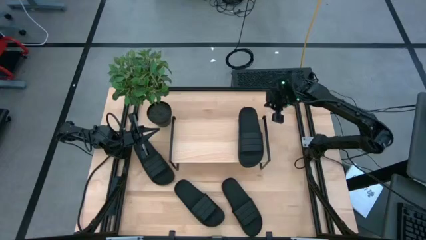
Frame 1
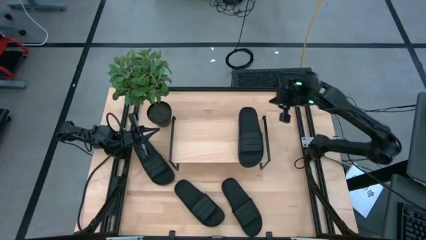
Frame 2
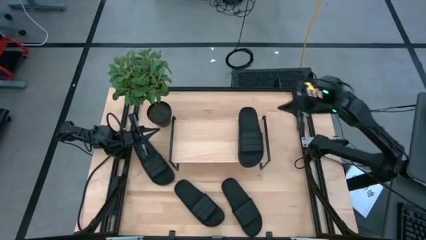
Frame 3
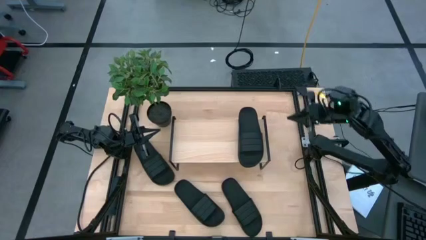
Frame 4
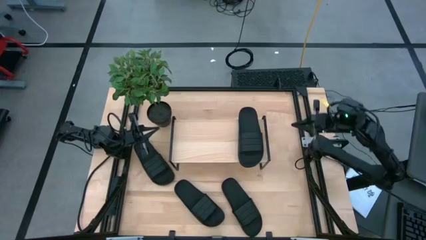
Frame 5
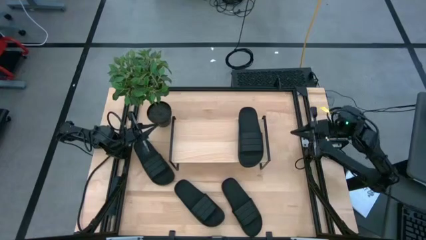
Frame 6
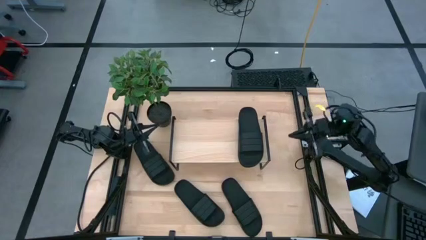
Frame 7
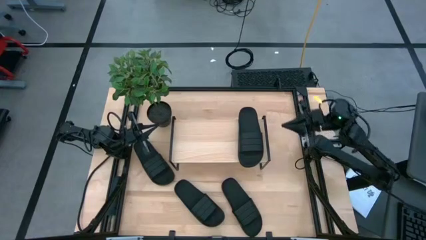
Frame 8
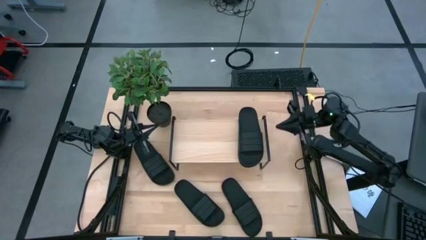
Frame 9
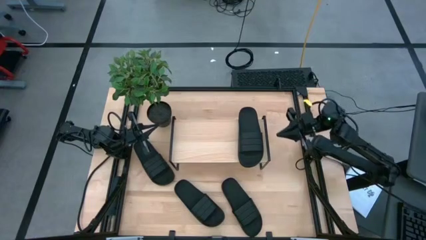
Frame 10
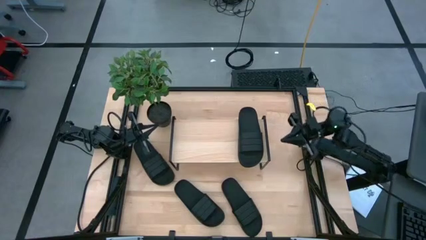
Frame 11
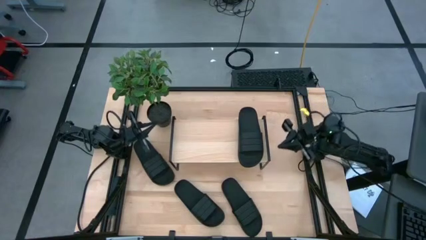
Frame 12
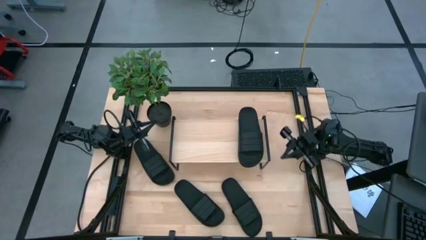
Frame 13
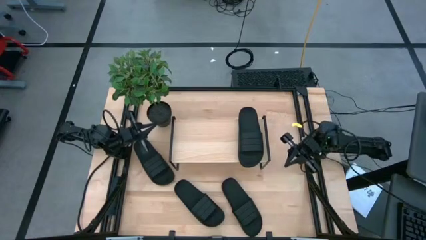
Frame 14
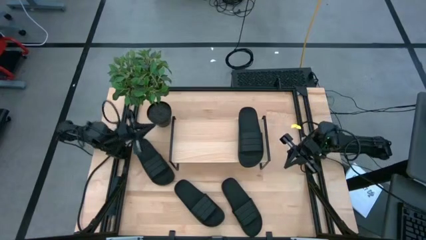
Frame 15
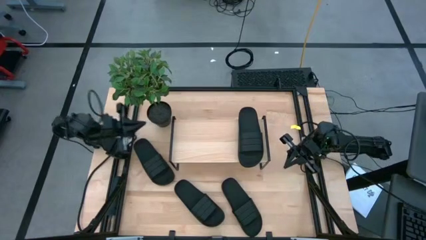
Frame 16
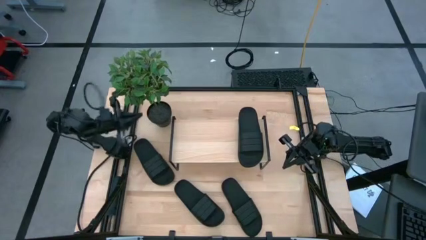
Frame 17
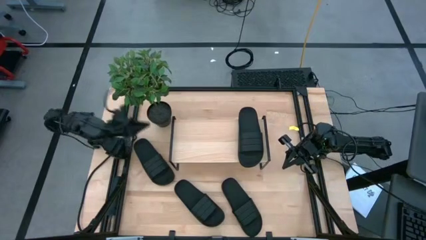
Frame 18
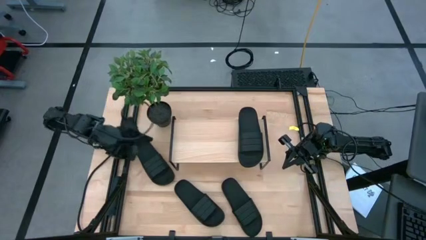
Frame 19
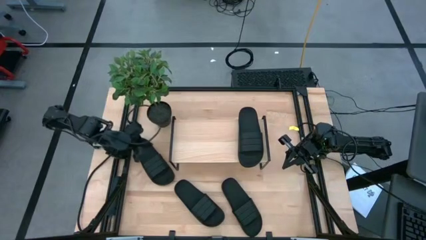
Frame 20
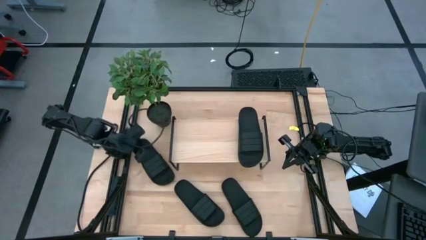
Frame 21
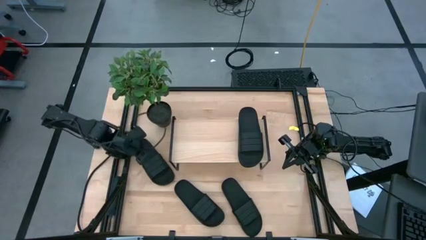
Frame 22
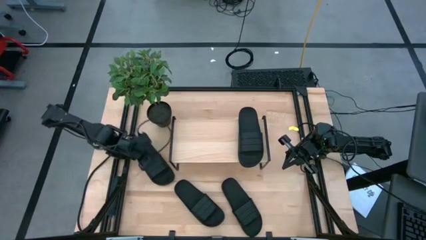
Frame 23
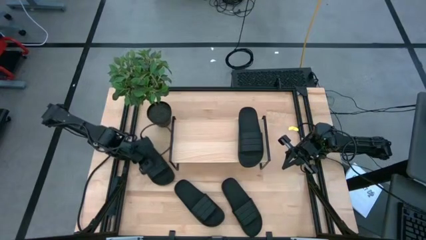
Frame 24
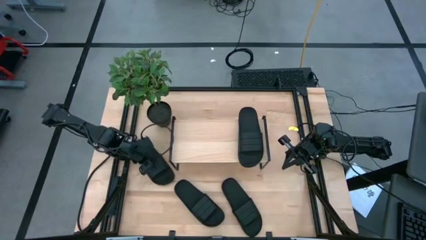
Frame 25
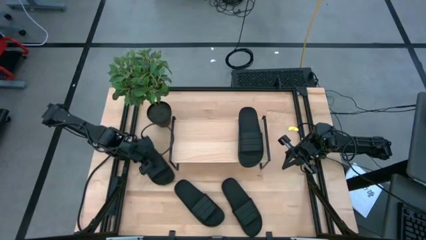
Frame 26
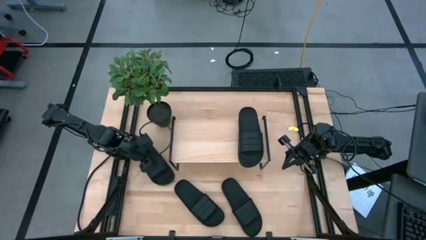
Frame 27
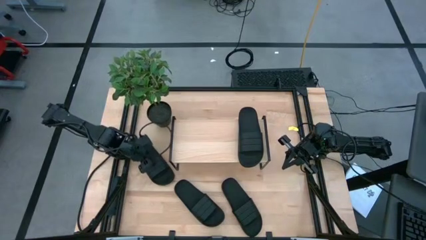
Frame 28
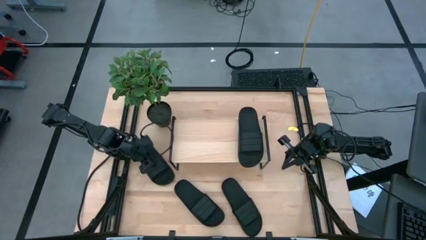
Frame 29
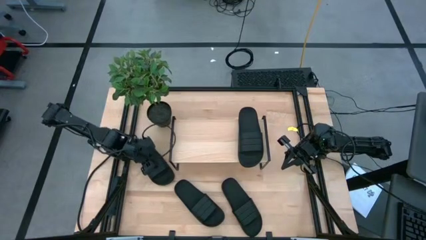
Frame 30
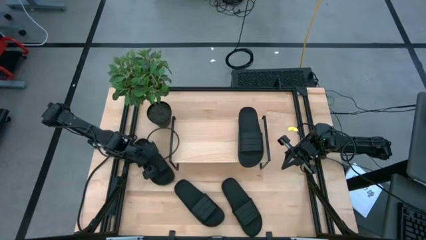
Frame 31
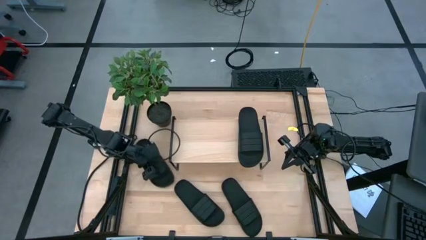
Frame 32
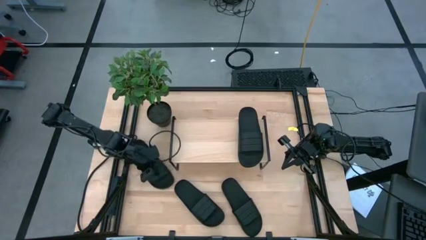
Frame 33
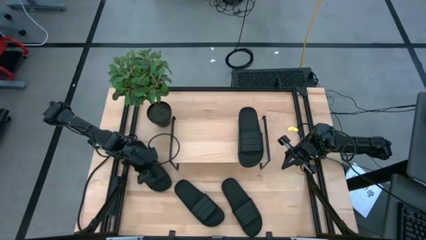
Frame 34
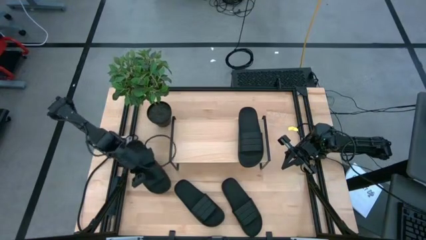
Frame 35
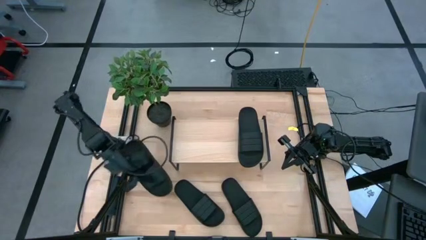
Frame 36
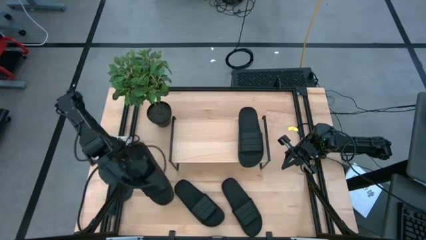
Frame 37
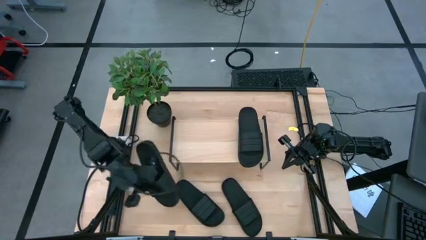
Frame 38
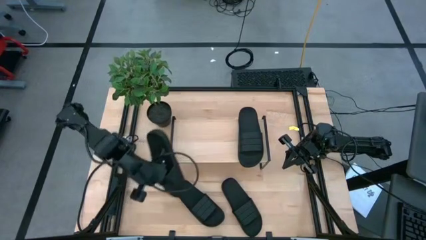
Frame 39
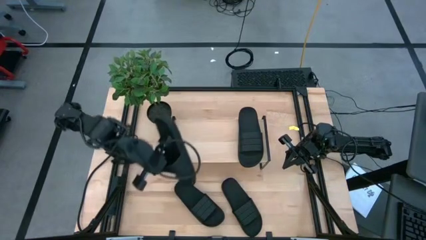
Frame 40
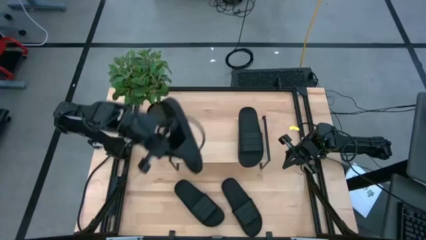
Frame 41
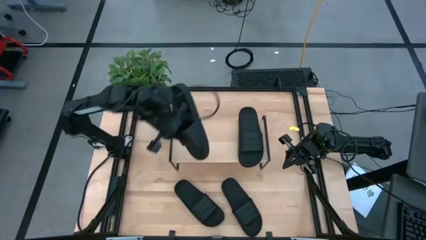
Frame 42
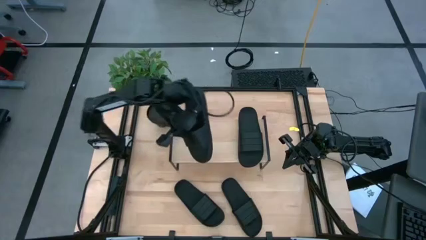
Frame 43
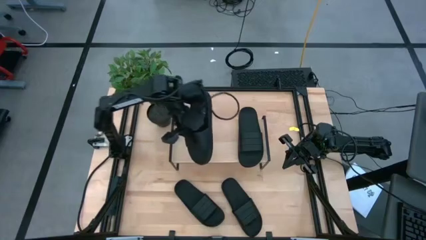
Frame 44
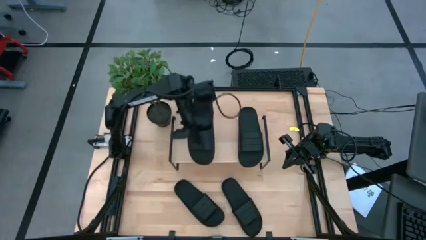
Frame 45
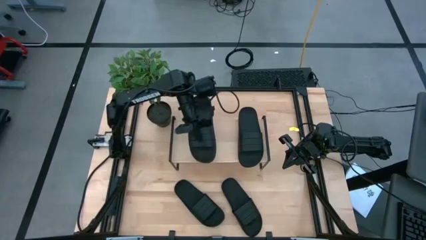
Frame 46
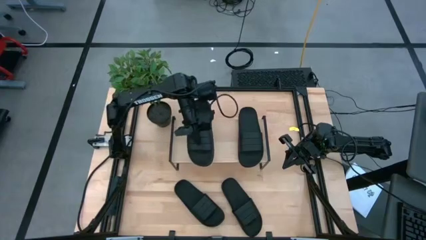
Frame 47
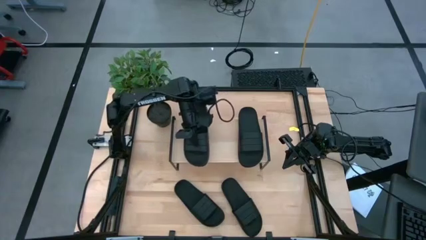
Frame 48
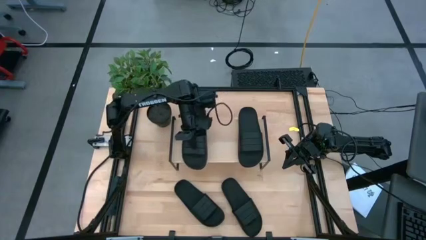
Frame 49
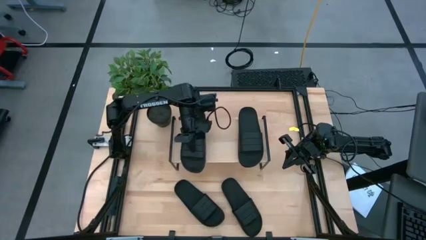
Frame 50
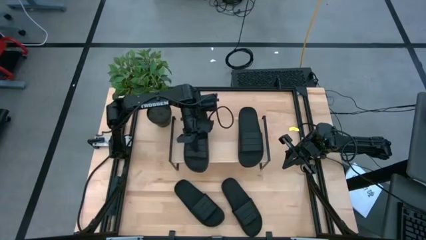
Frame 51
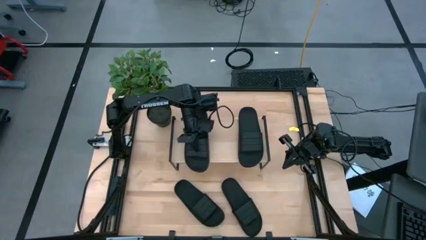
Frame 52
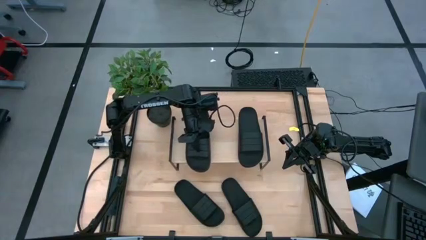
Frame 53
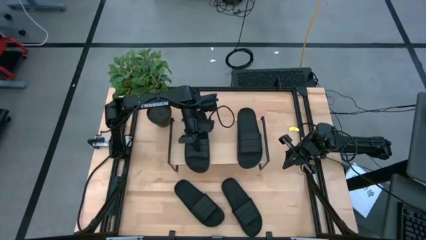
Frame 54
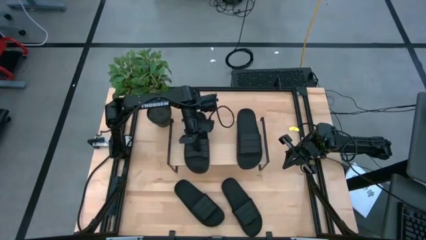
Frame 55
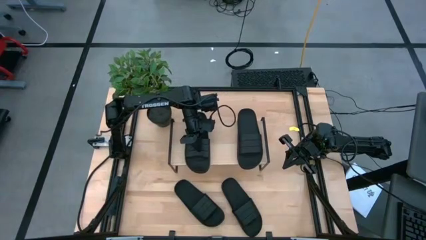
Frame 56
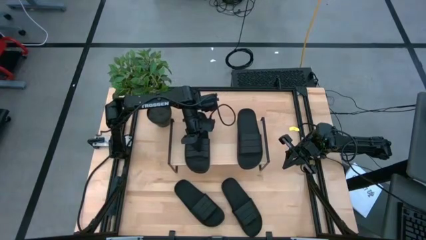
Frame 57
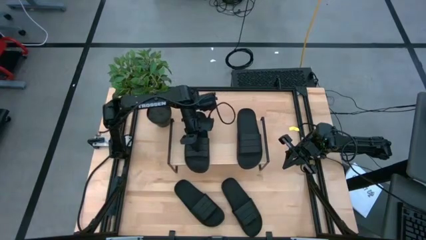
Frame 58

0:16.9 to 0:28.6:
Task: Pick and place slides into the shelf
Put the black slipper on the shelf

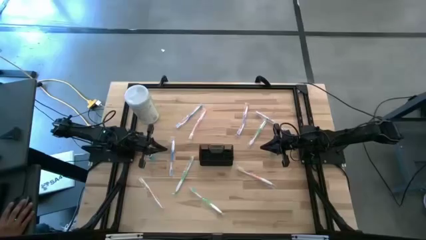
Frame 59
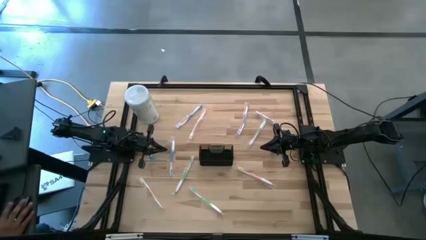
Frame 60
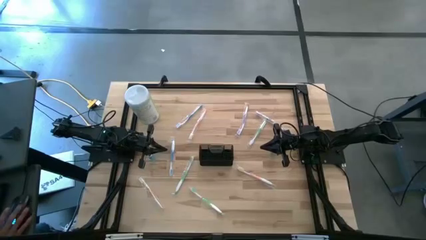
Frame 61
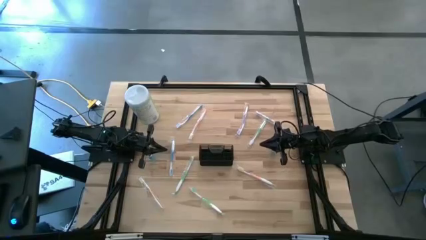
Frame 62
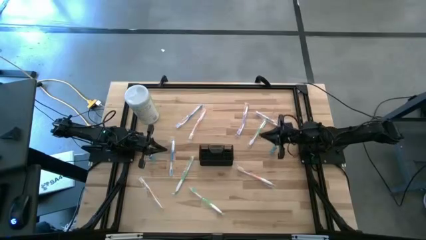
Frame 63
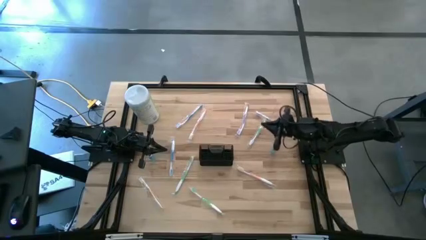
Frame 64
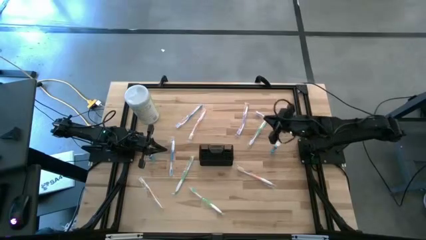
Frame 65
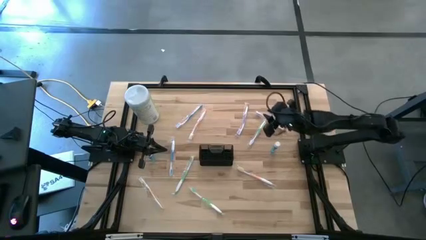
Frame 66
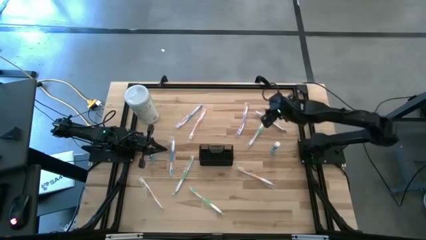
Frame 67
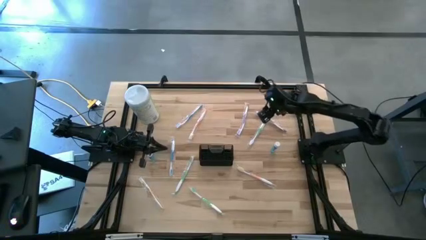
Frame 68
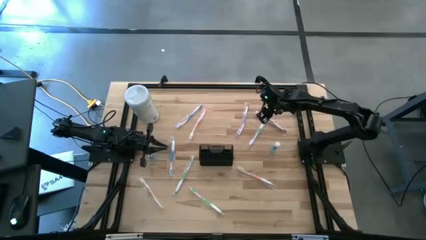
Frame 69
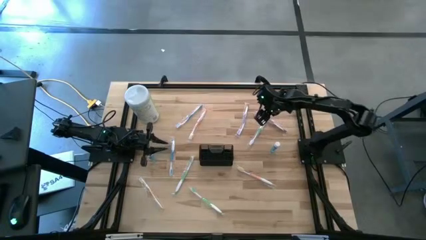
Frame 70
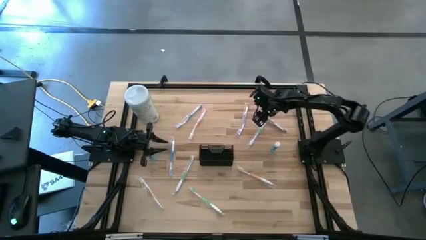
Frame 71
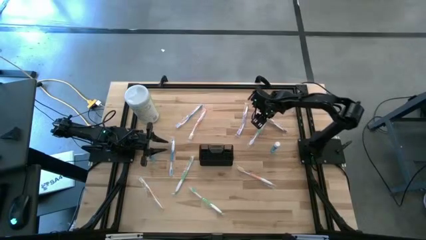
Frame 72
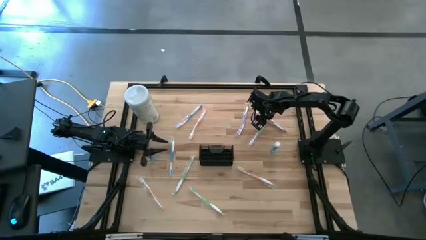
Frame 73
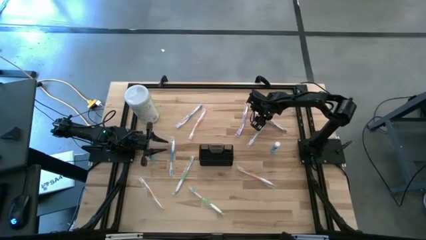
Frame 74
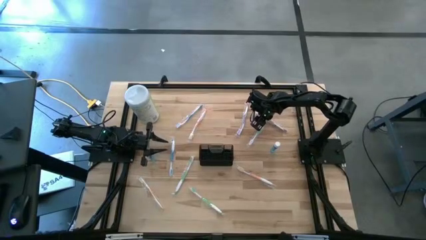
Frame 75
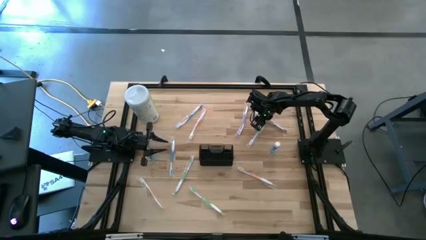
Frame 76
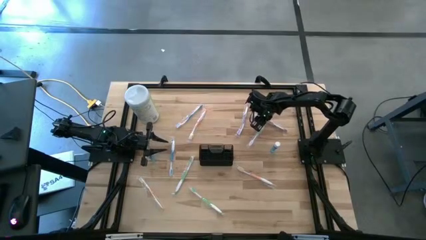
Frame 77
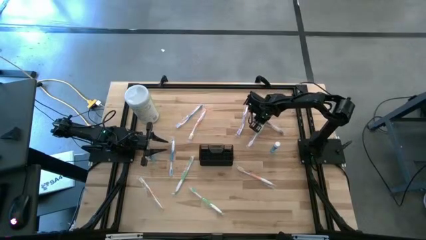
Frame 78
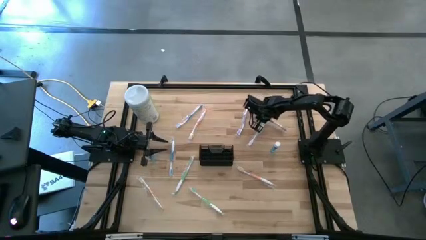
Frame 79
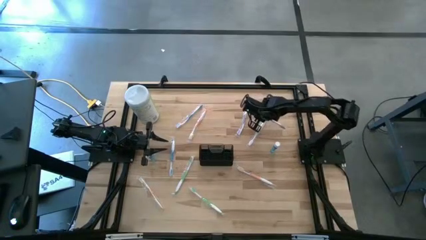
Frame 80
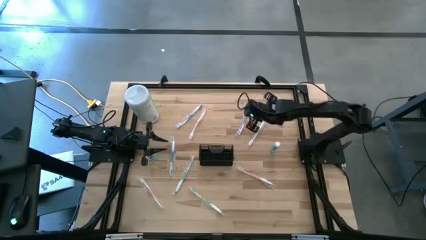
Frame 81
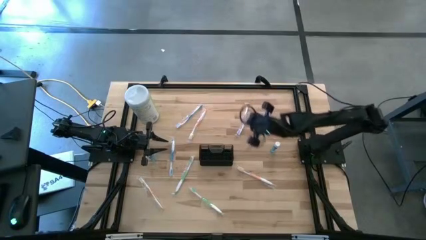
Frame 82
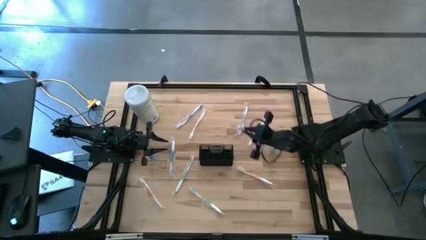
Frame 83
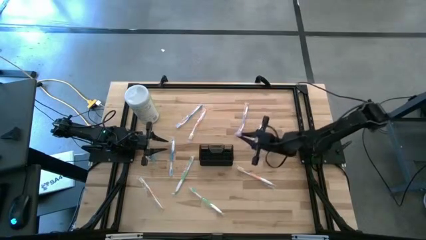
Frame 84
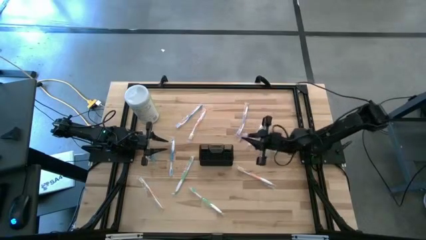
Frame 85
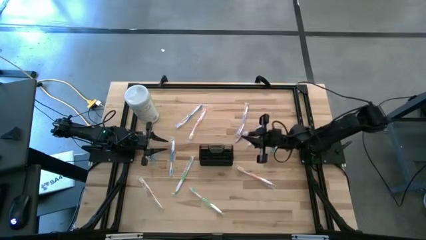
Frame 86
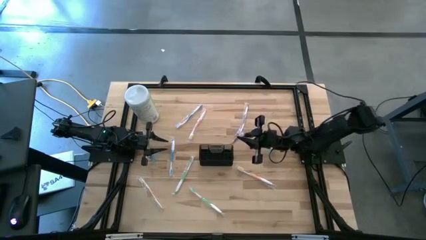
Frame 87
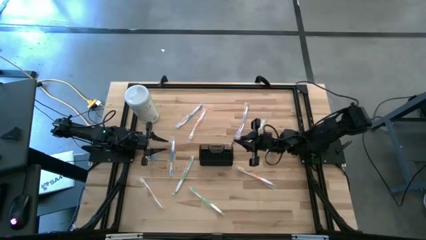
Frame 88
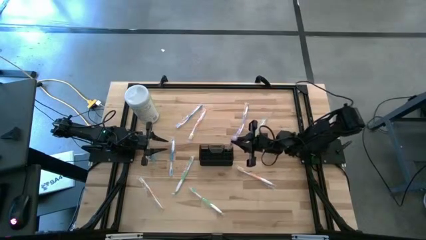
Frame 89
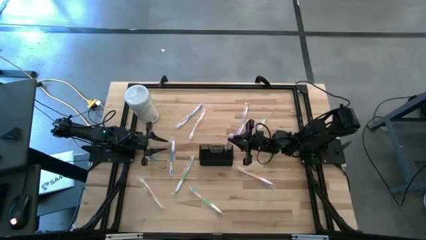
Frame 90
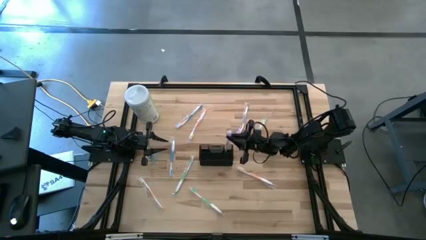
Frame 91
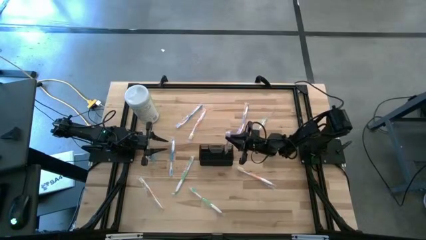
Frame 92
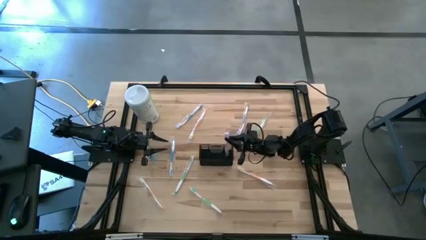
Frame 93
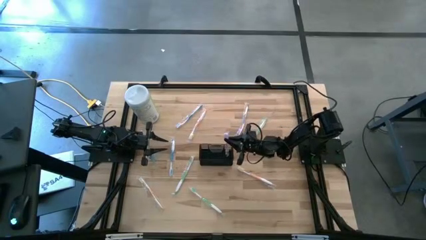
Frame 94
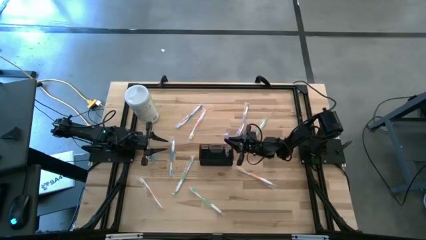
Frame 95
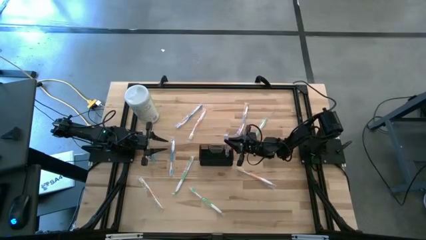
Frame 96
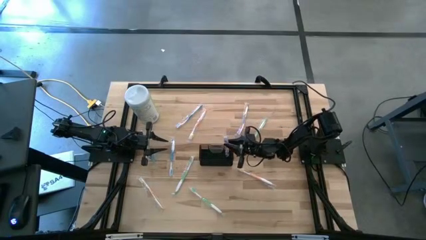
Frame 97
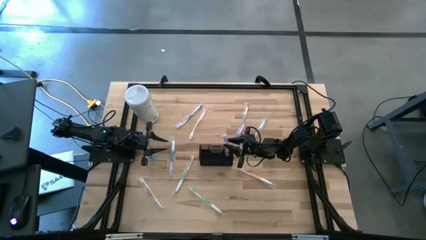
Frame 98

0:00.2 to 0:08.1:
Task: Pick & Place toothbrushing station
Put the right purple toothbrush into the black mesh
